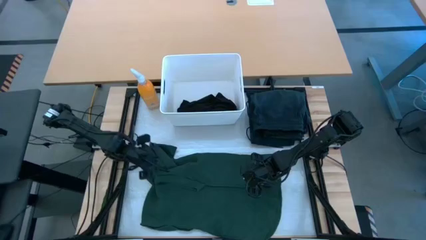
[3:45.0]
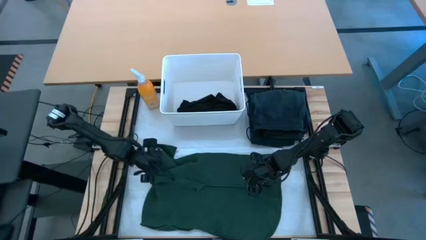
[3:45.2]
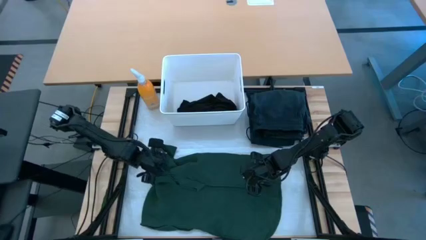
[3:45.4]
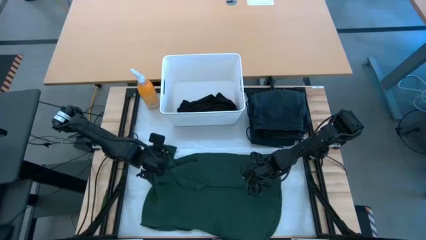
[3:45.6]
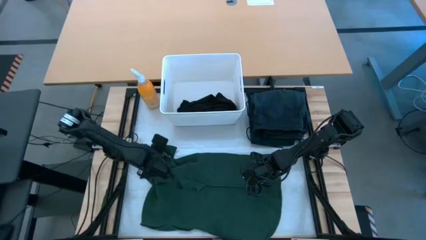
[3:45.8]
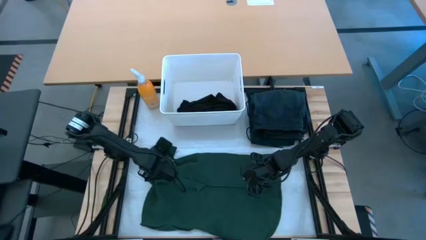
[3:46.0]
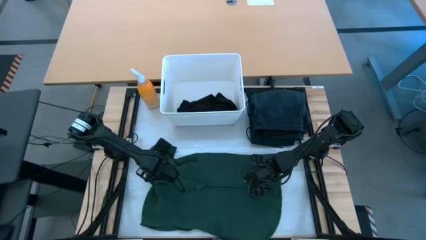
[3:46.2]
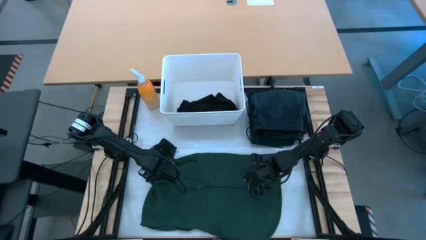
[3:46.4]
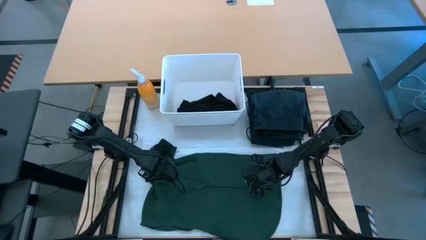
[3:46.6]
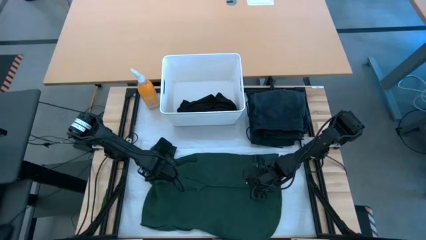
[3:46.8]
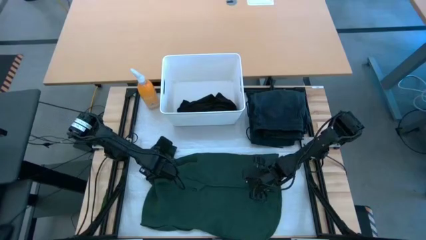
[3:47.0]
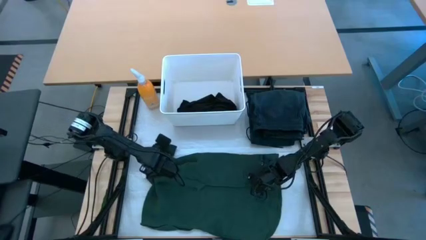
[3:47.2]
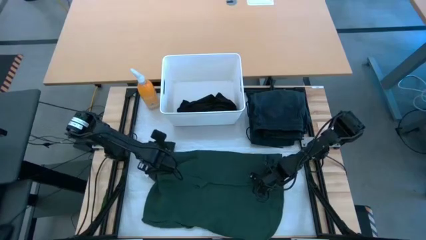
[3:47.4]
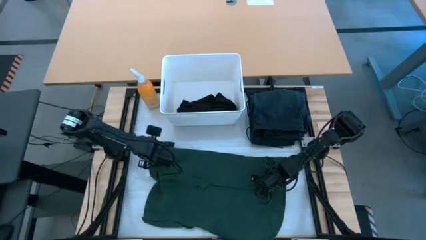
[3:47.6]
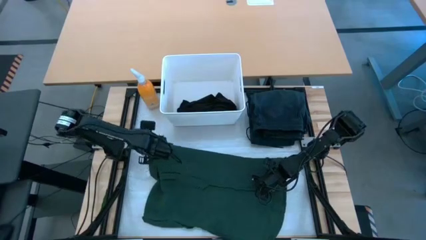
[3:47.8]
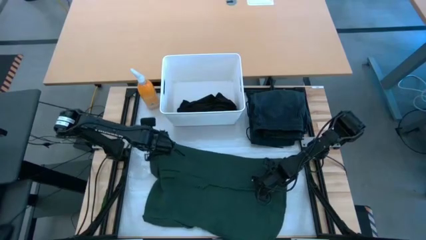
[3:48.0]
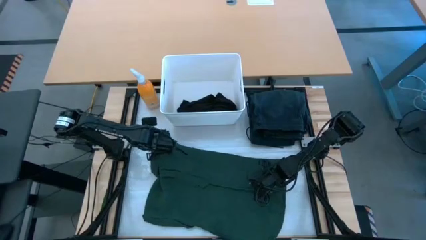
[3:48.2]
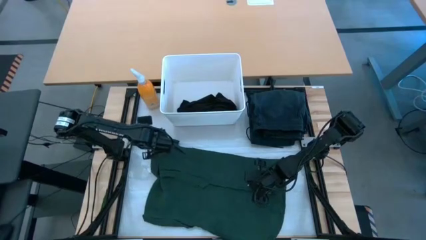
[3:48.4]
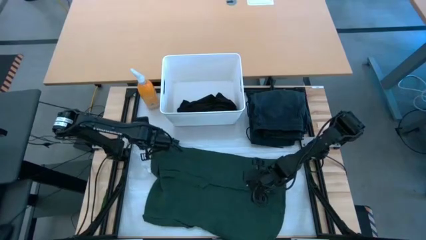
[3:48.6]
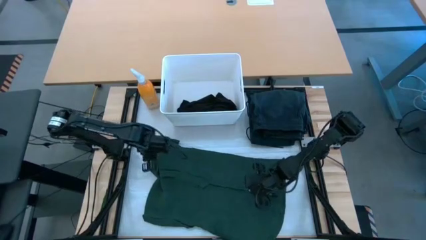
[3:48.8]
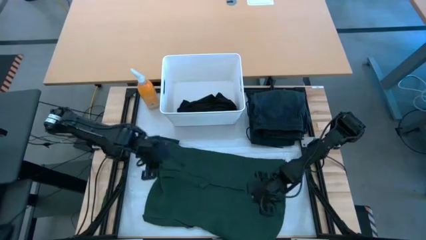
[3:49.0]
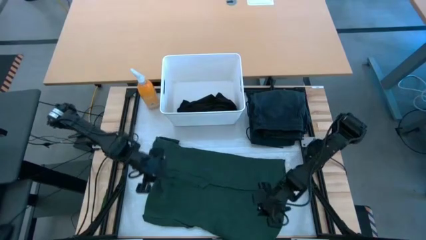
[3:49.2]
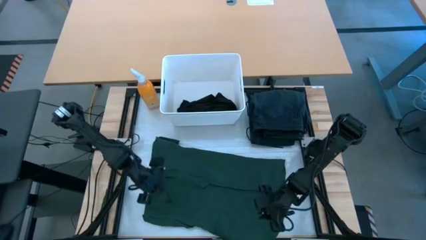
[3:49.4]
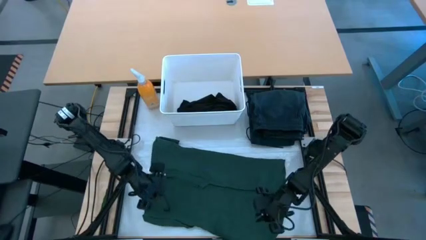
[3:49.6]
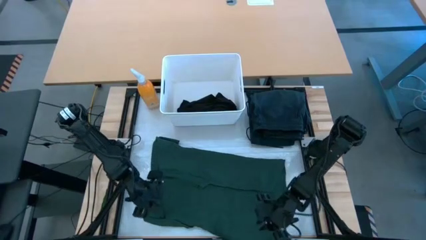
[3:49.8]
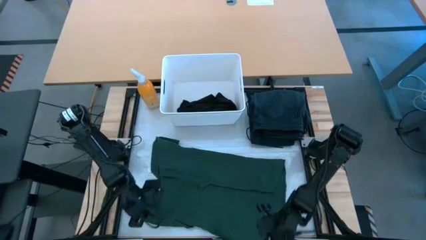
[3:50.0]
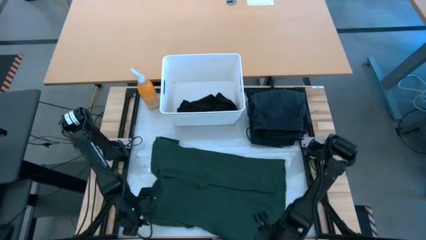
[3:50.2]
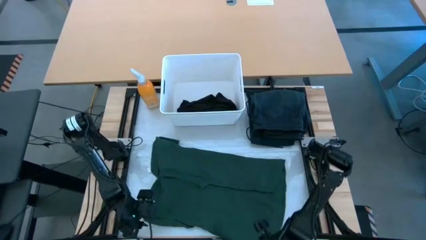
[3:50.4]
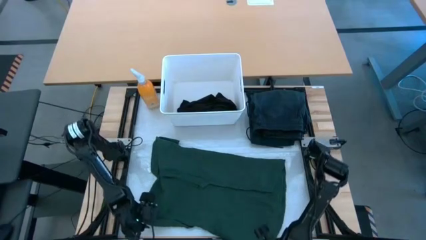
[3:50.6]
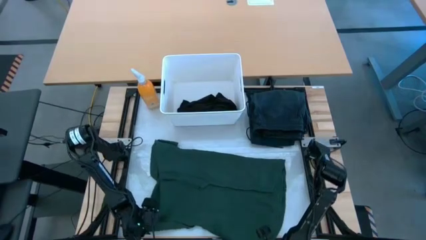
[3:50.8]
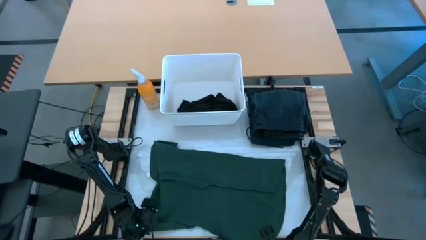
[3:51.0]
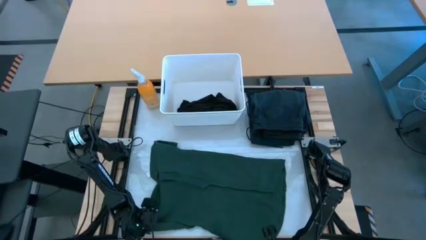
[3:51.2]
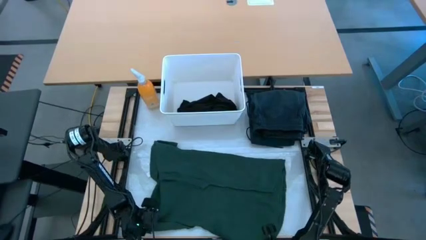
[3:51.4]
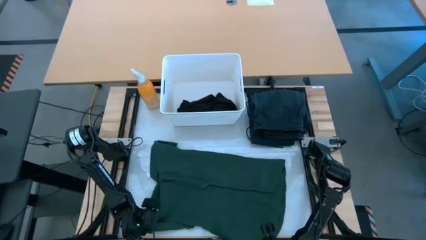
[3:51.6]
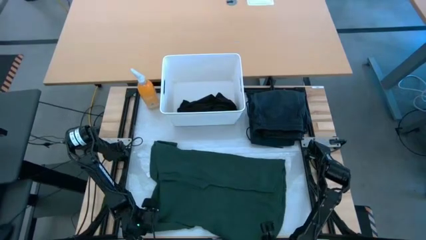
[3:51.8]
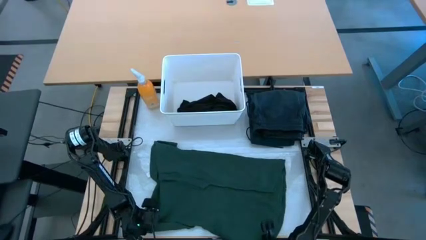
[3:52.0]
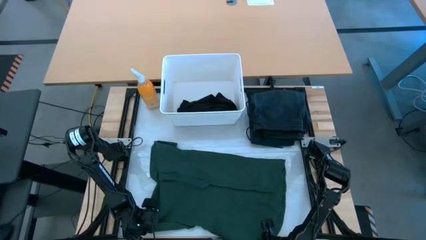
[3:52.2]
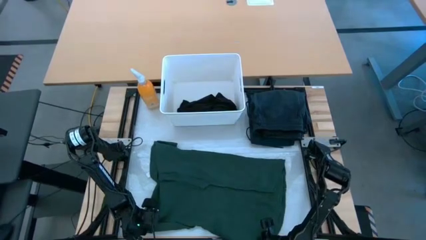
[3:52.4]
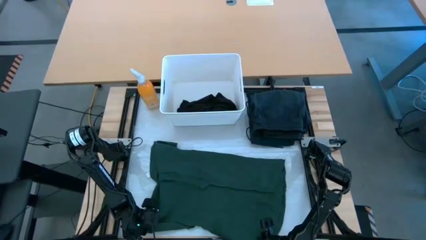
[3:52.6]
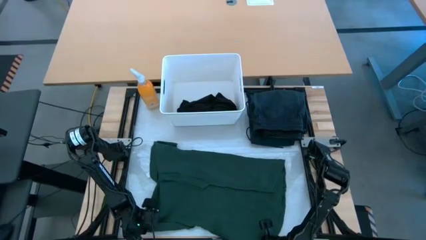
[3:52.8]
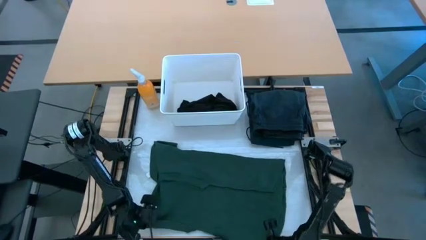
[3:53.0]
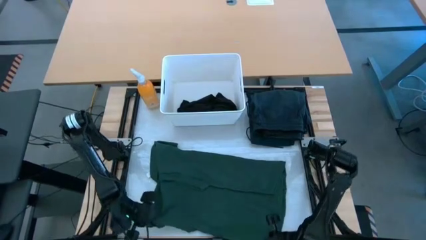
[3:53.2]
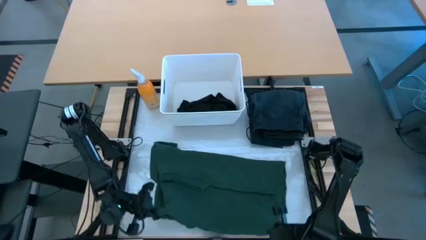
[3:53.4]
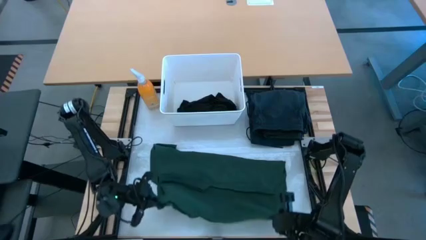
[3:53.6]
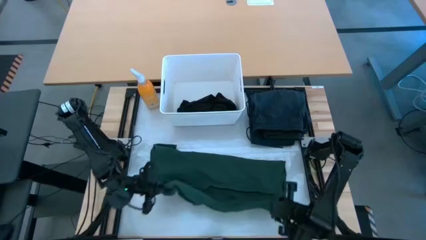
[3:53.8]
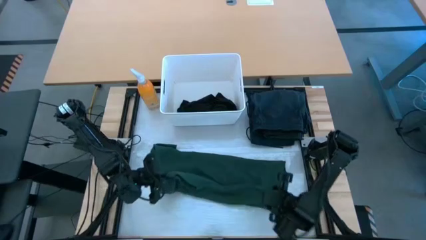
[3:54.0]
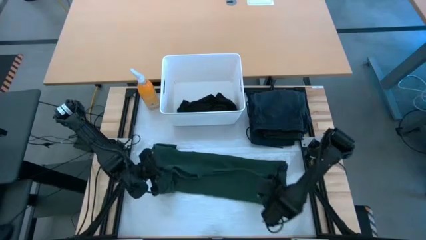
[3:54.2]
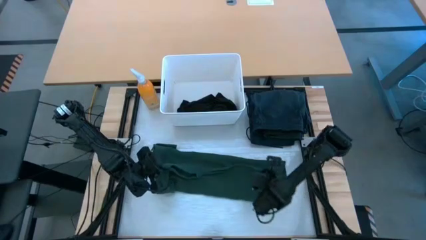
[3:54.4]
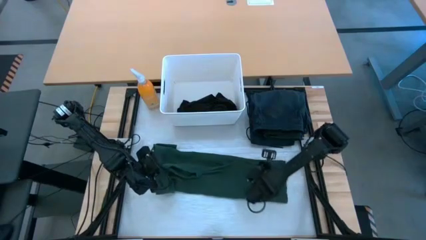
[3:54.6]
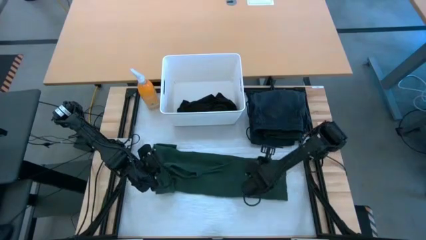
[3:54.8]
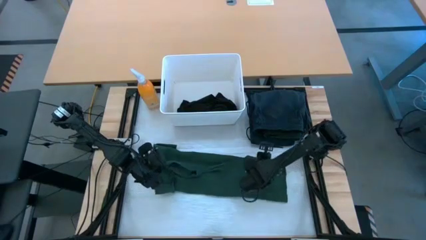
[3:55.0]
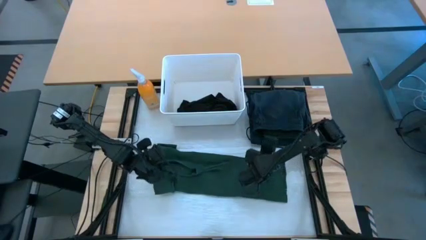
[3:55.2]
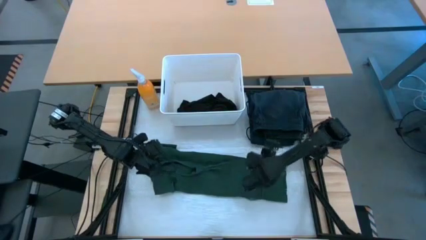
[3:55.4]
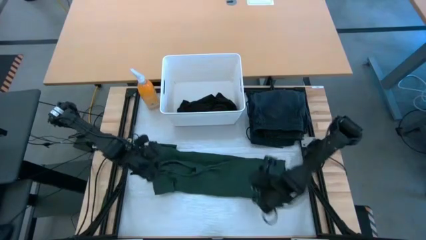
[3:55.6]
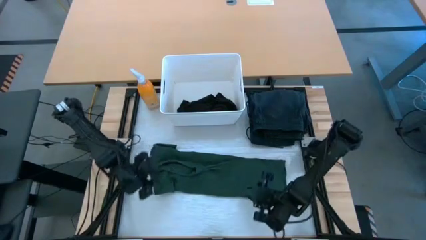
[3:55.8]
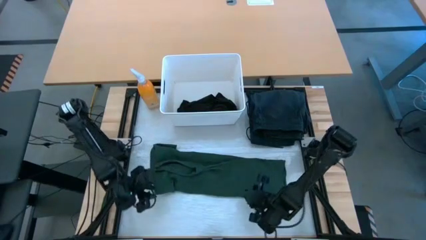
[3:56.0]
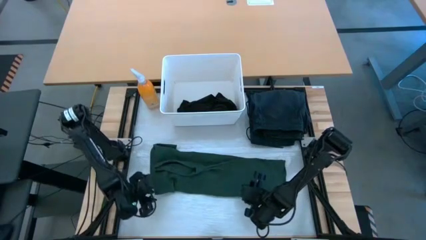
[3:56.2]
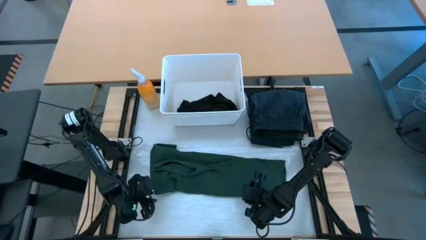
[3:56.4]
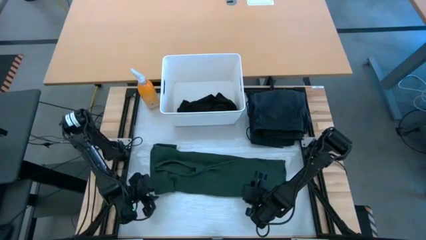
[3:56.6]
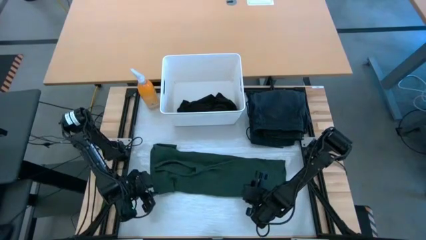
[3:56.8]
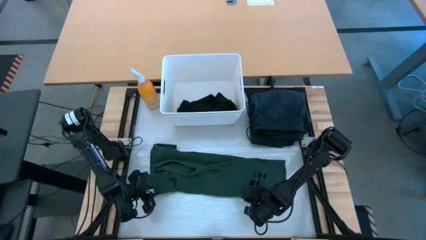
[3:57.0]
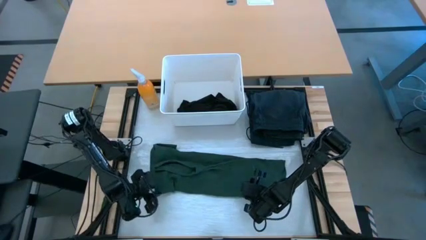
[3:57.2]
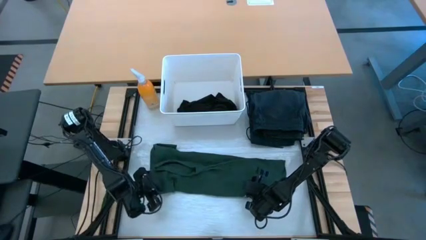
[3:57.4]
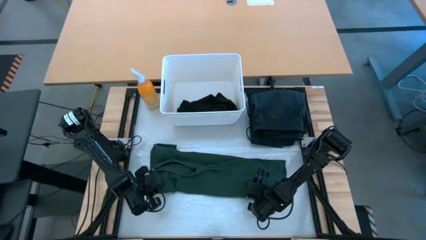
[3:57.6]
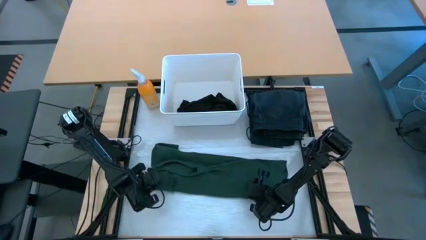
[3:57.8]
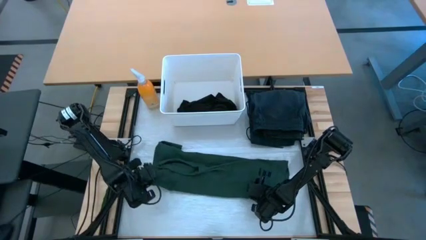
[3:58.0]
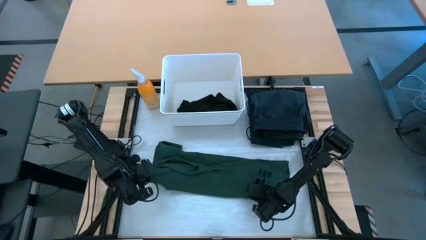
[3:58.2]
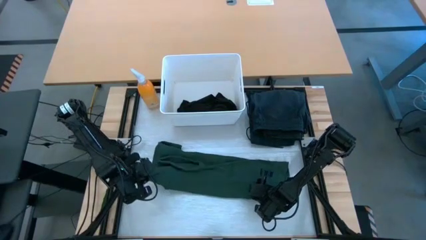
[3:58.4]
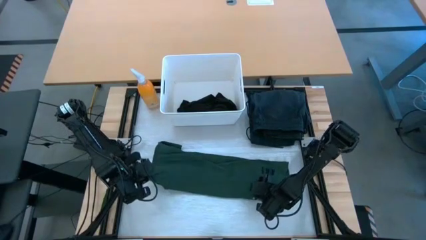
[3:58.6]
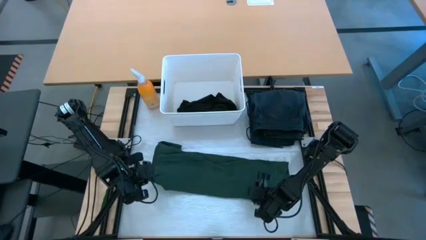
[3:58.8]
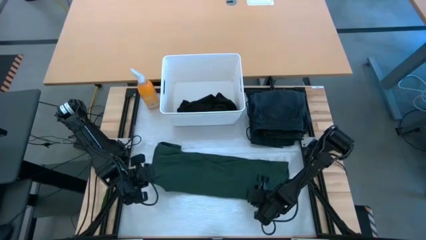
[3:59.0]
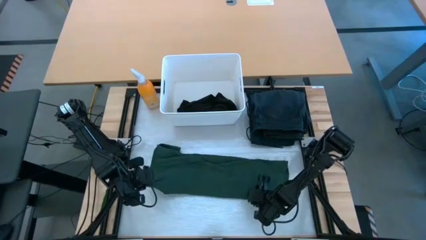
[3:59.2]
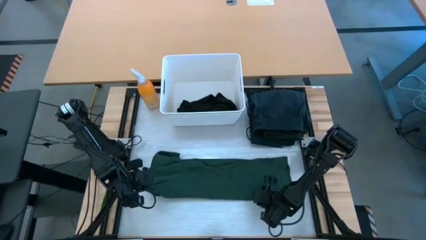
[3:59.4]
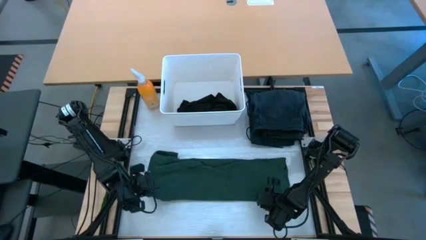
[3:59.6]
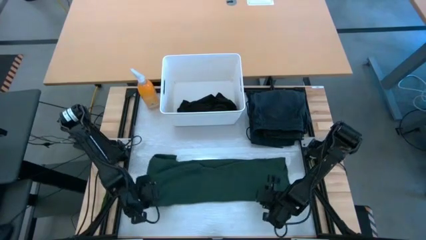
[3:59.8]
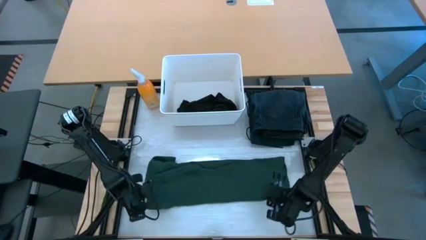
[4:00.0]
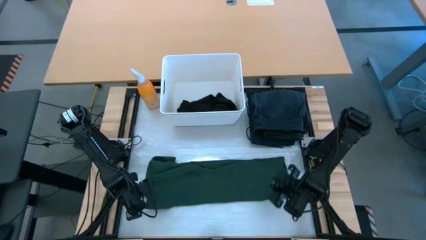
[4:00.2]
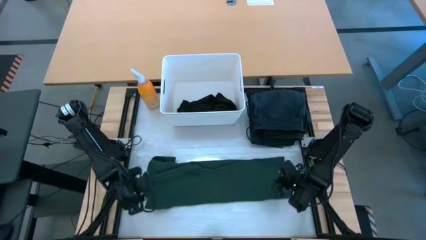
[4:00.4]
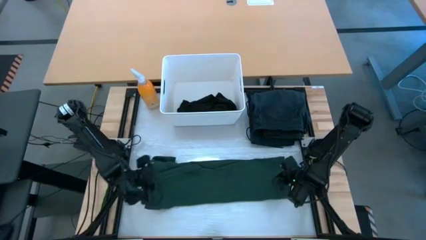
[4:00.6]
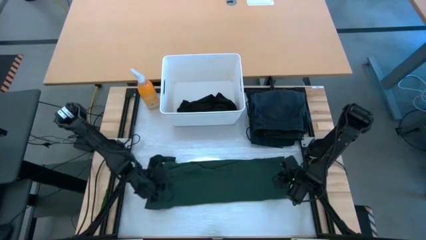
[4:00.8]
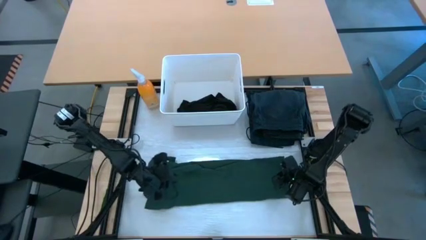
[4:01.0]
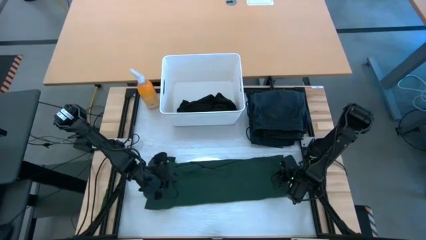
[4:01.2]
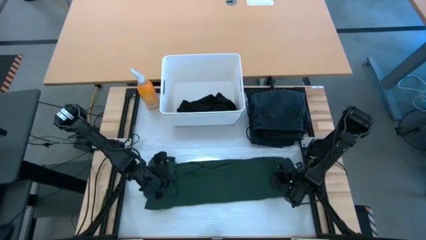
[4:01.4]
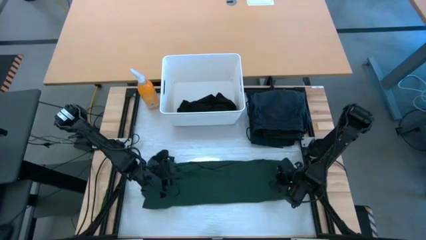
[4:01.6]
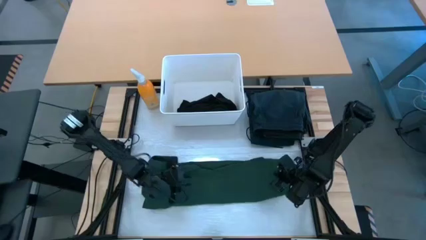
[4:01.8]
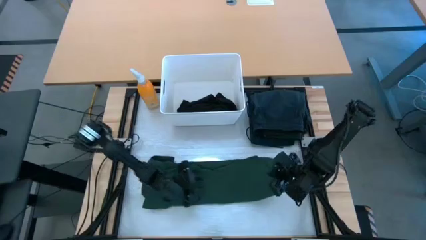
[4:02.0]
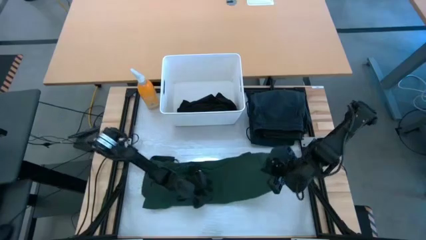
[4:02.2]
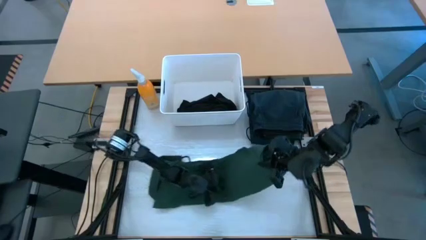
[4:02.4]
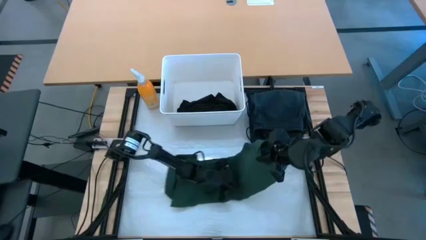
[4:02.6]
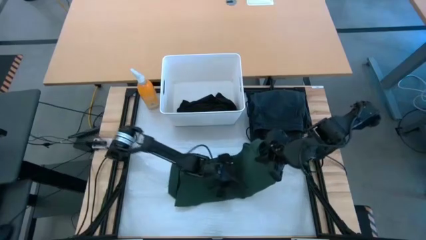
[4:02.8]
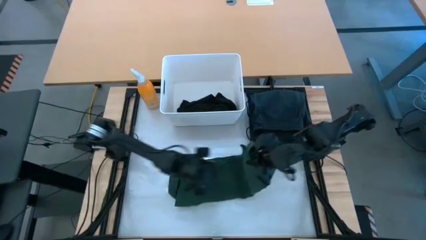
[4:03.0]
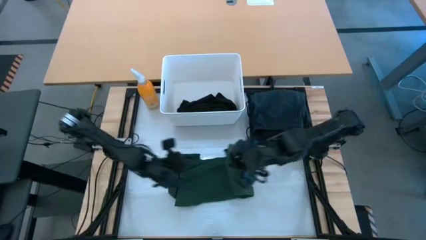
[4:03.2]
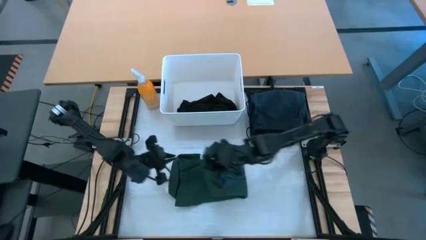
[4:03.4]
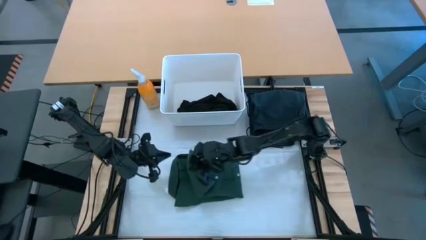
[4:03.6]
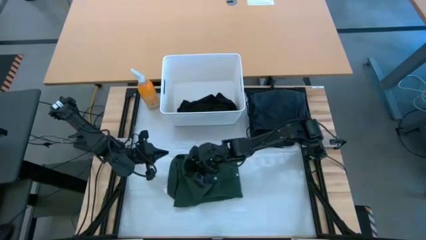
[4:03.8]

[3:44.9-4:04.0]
Task: Fold laundry
Fold the green polo
